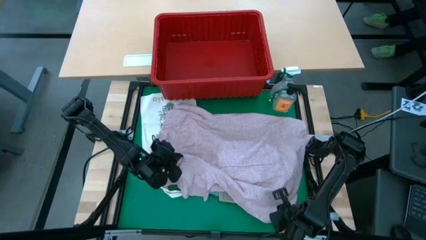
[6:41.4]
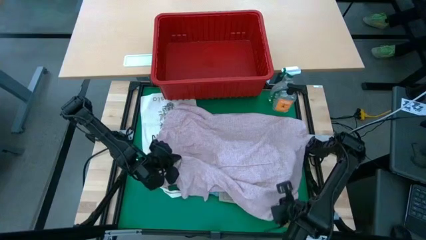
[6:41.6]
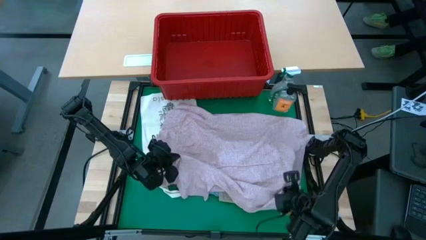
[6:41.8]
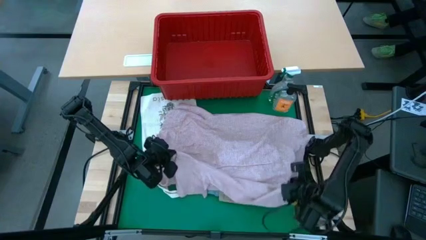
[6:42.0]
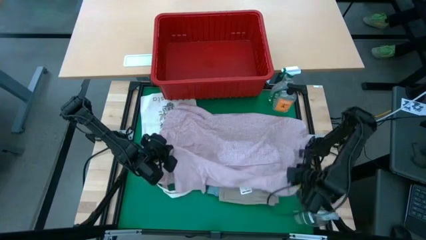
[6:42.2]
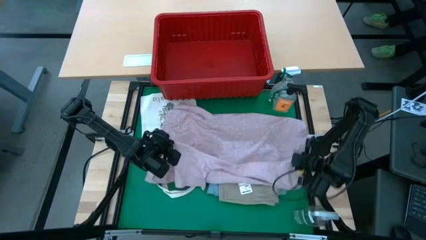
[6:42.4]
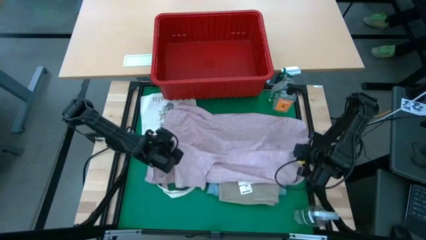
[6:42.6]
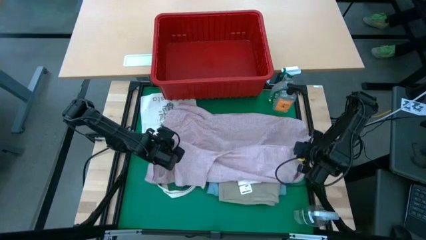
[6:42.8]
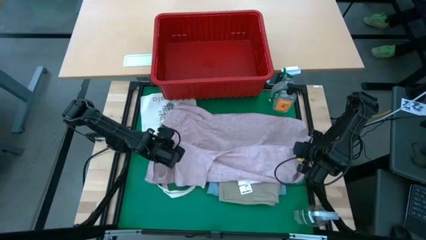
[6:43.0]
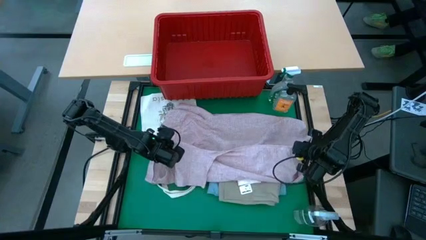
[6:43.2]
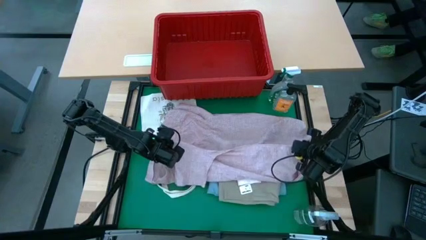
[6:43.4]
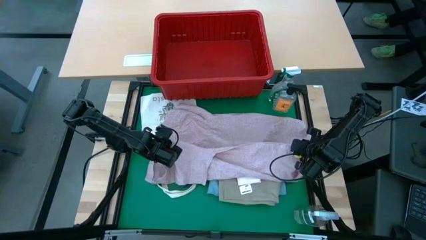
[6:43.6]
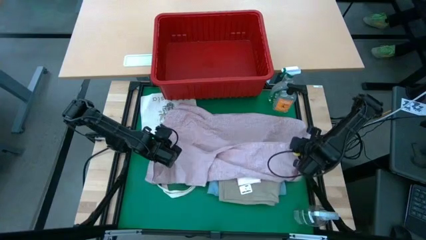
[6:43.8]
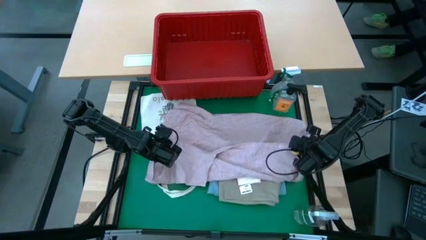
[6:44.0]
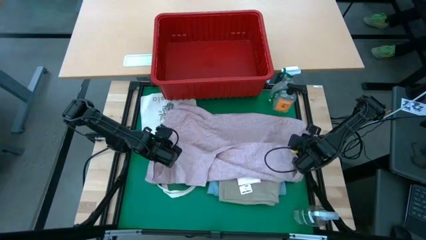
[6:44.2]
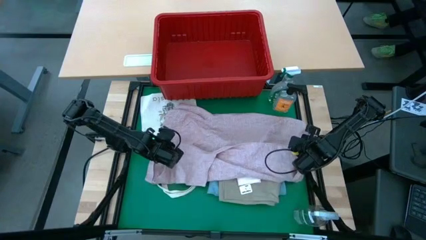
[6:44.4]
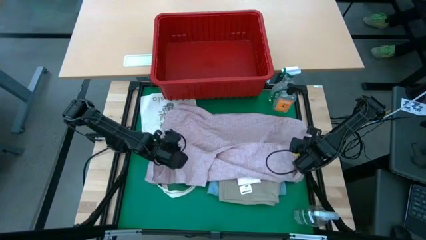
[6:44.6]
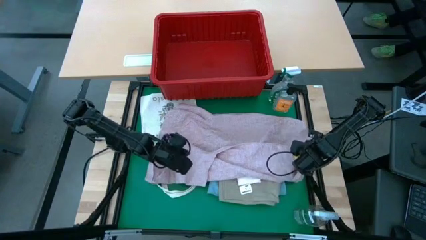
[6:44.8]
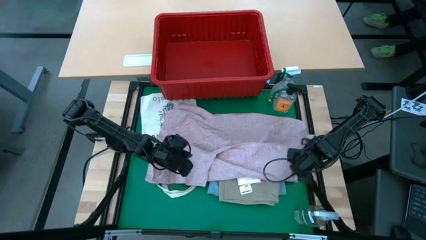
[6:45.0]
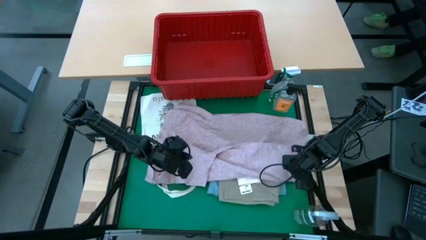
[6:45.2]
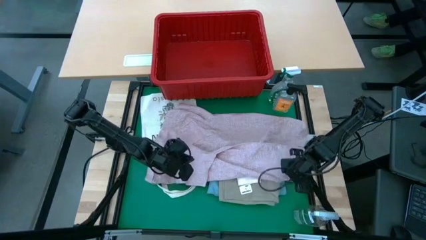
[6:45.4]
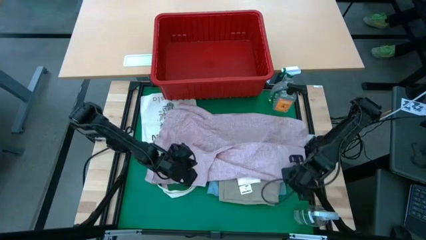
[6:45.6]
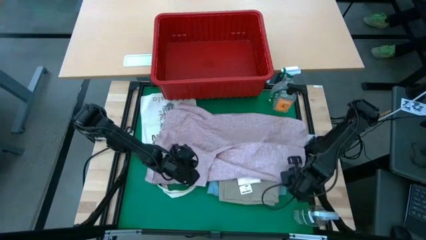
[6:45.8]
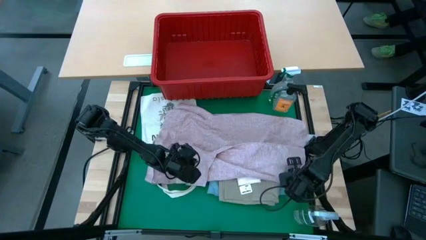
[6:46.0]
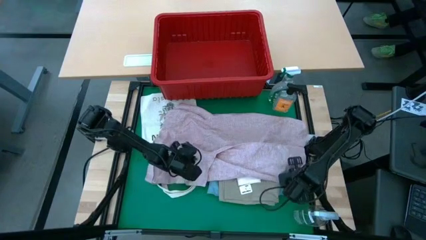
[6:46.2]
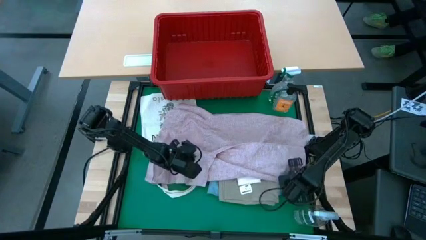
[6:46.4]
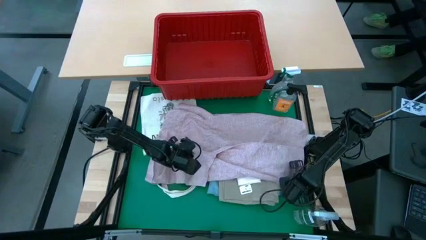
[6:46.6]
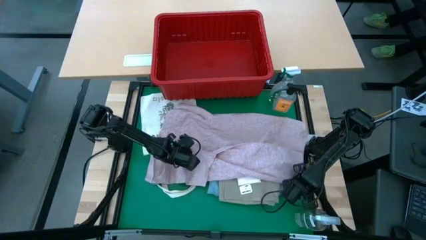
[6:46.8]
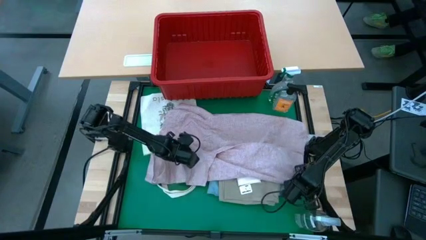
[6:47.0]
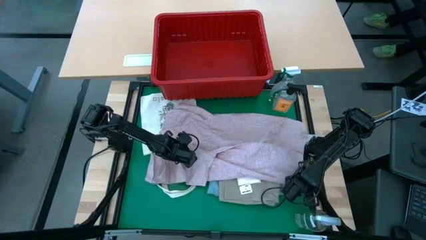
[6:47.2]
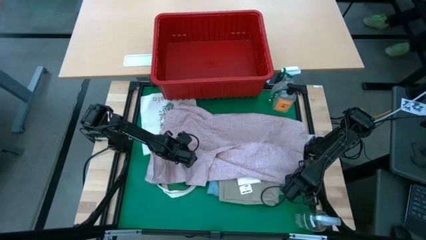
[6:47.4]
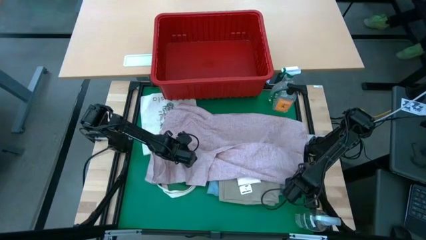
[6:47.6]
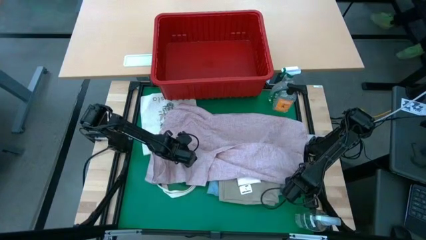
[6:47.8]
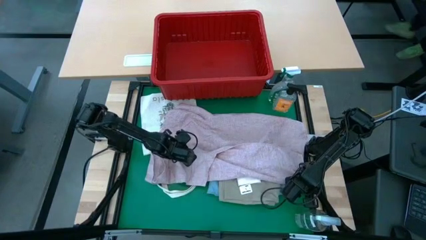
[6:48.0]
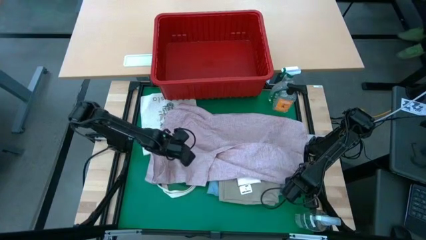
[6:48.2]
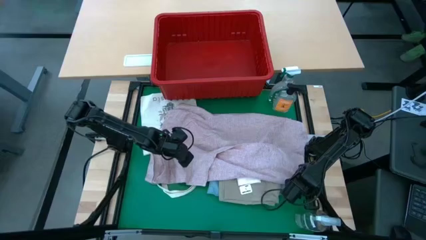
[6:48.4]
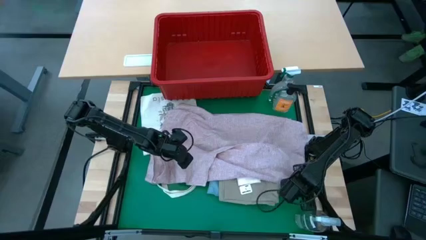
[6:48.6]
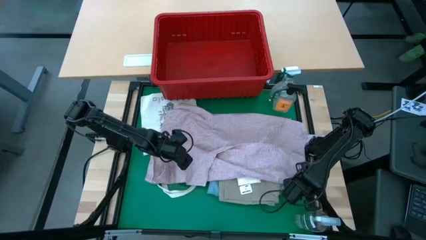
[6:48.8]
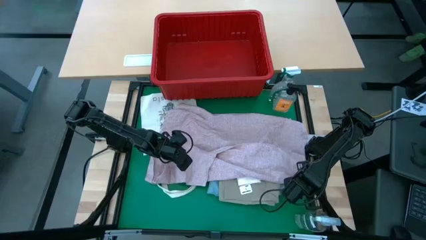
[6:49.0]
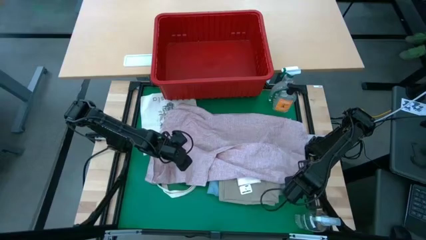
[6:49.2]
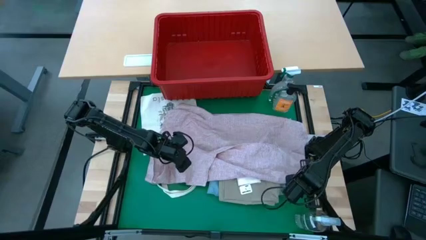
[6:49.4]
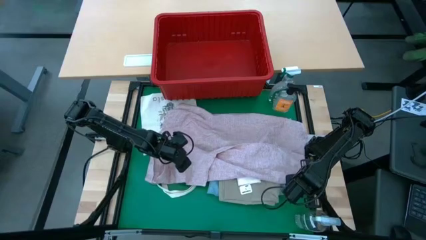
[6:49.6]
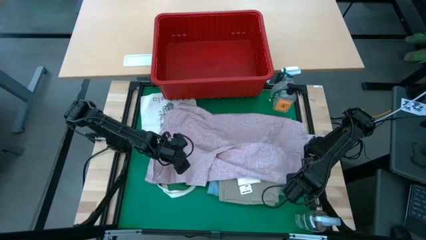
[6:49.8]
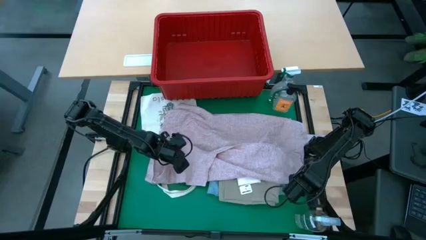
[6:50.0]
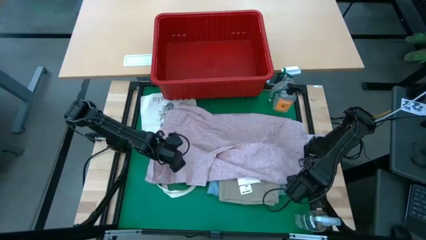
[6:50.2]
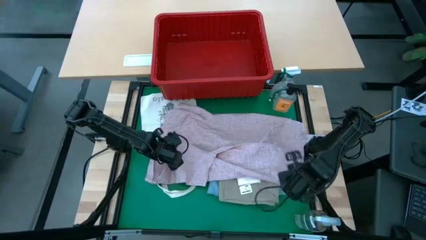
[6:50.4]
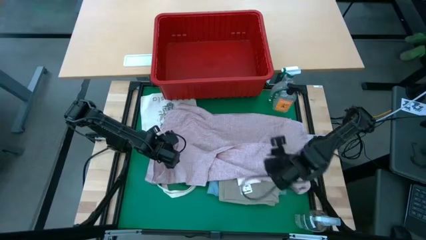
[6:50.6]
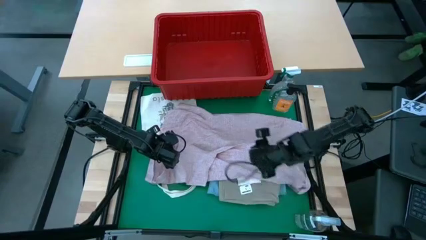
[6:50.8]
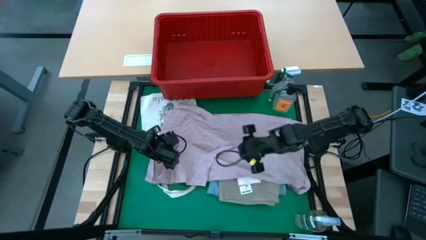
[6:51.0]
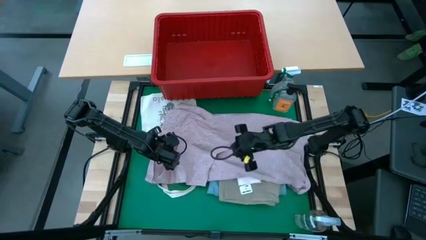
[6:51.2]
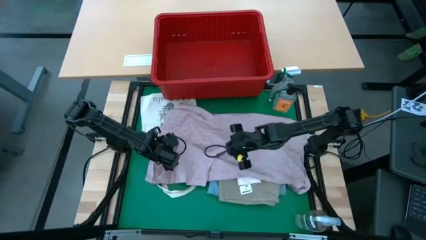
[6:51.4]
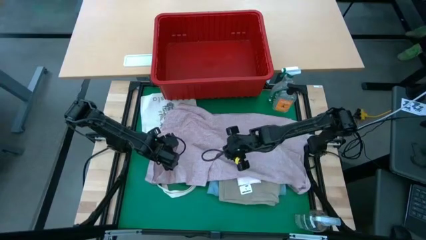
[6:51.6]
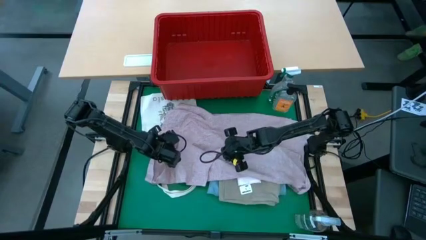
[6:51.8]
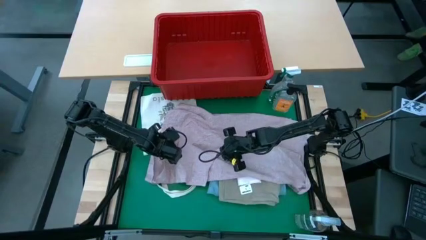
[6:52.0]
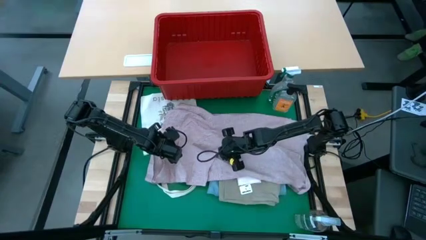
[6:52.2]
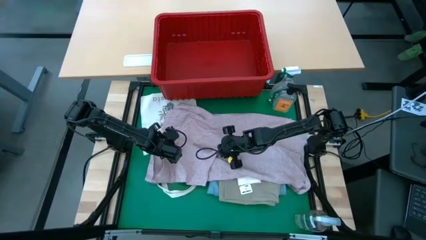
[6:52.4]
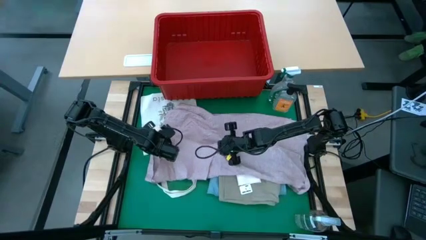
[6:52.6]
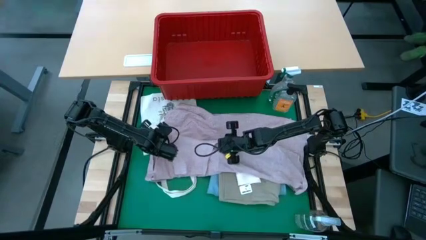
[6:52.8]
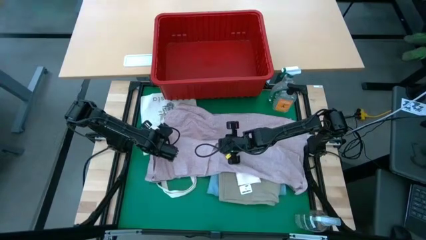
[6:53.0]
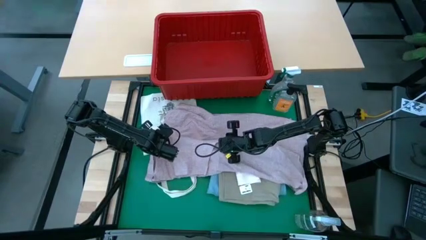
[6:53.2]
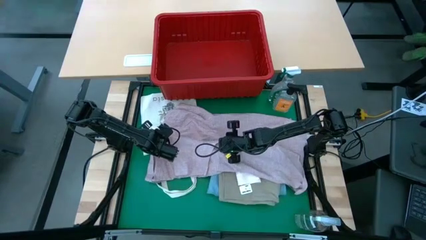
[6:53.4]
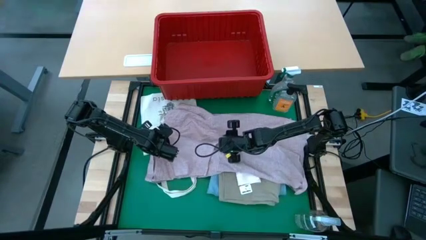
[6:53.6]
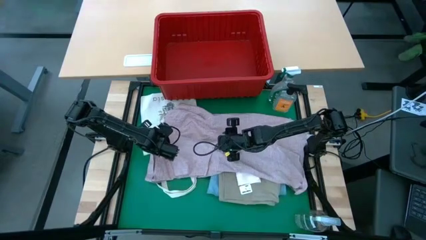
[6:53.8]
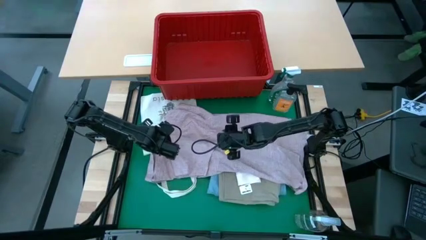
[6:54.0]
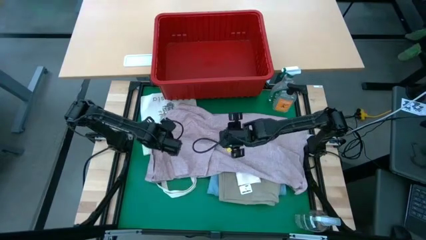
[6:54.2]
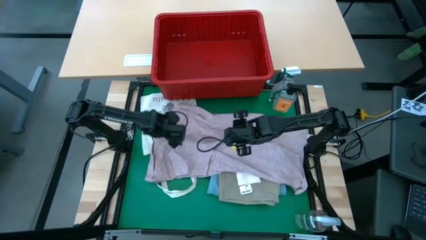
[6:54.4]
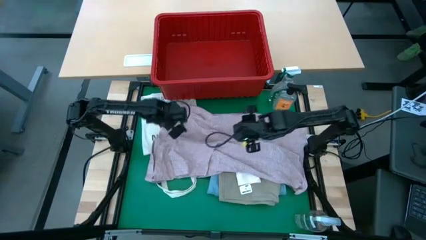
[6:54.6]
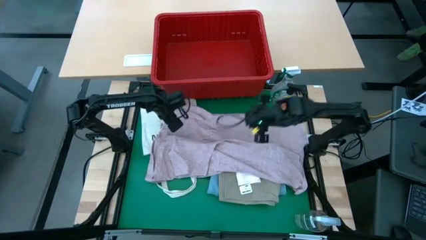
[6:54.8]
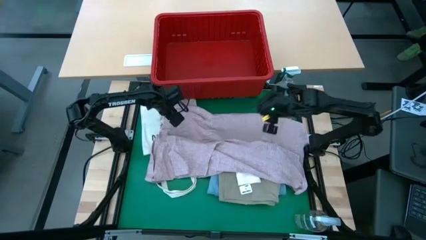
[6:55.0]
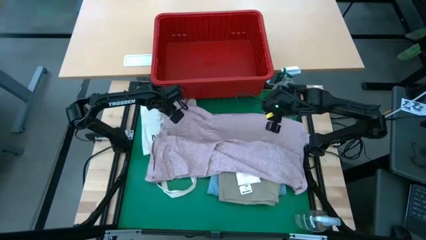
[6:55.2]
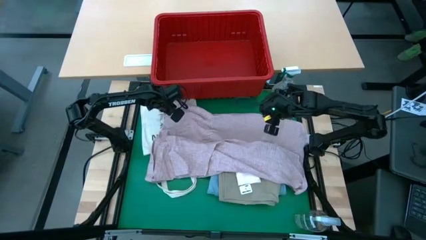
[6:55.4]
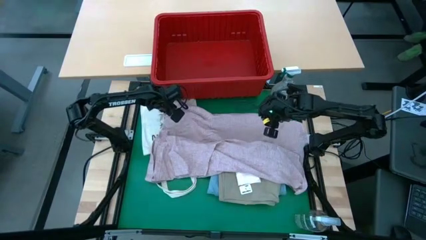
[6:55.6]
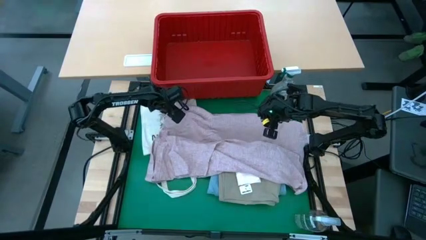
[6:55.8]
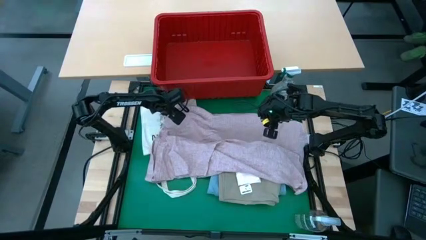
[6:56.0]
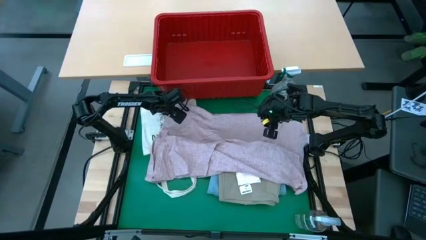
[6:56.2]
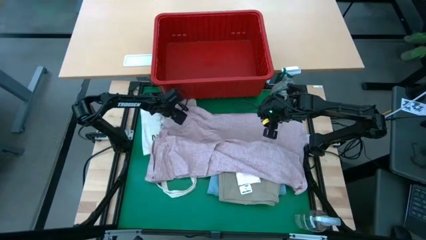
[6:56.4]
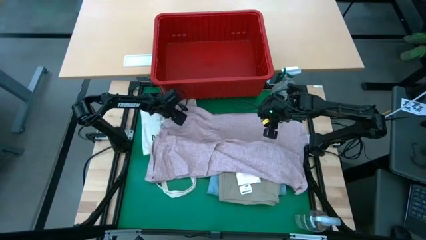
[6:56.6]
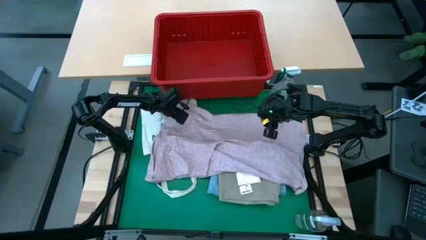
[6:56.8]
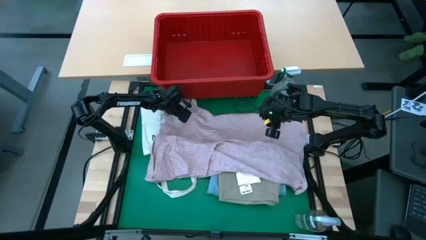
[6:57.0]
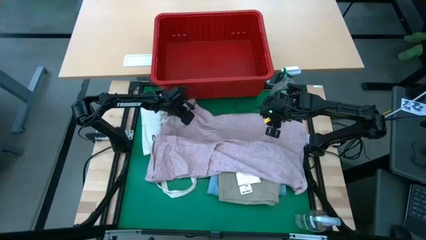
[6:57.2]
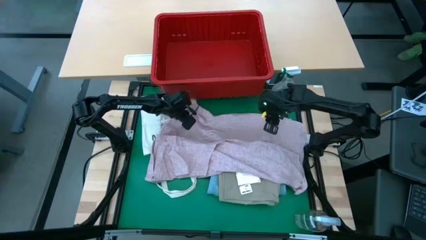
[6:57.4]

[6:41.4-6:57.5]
Task: Fold laundry
Fold the pink polo
